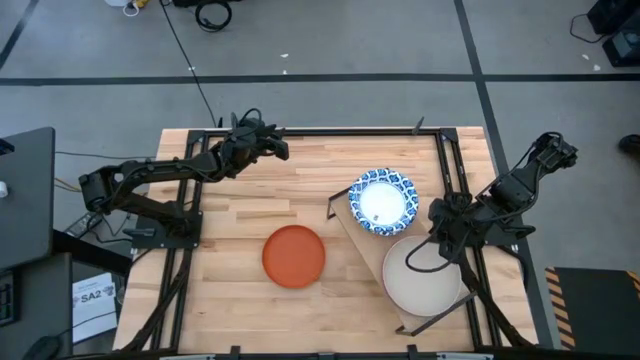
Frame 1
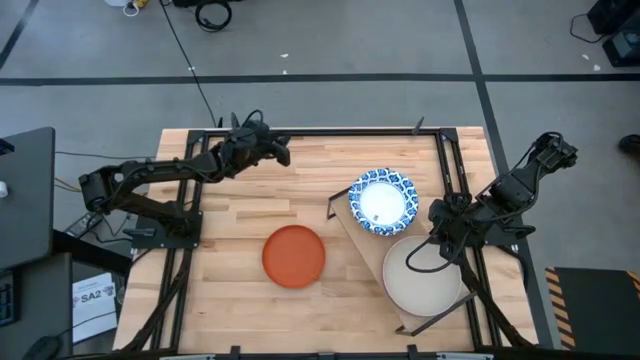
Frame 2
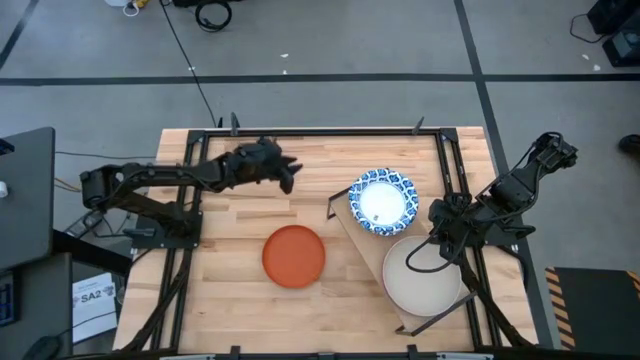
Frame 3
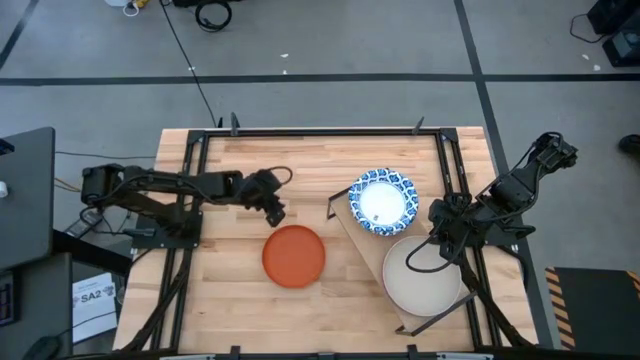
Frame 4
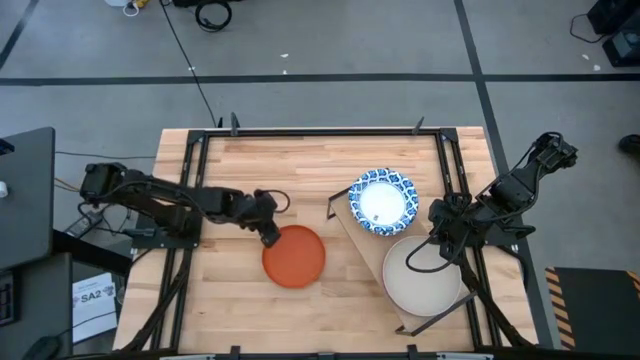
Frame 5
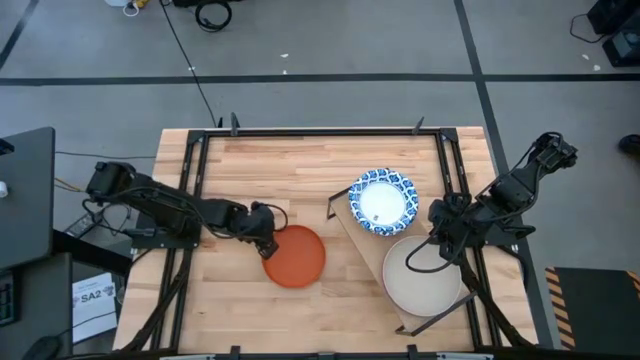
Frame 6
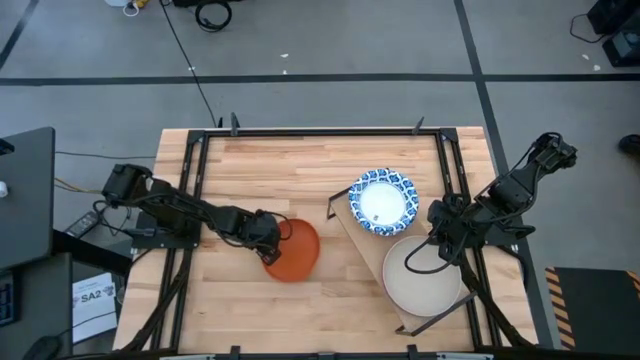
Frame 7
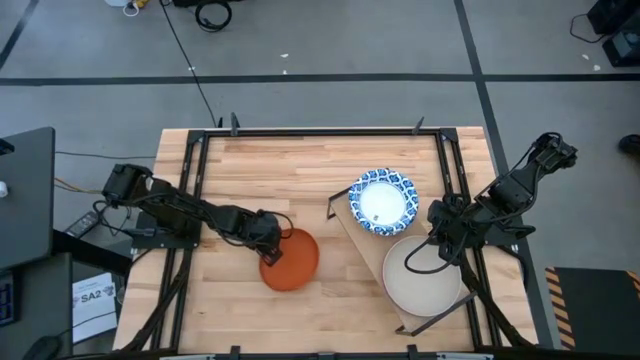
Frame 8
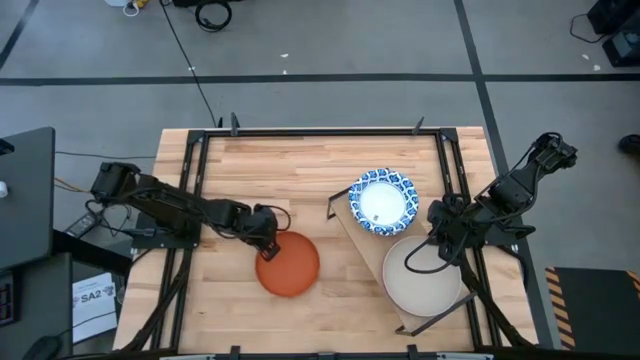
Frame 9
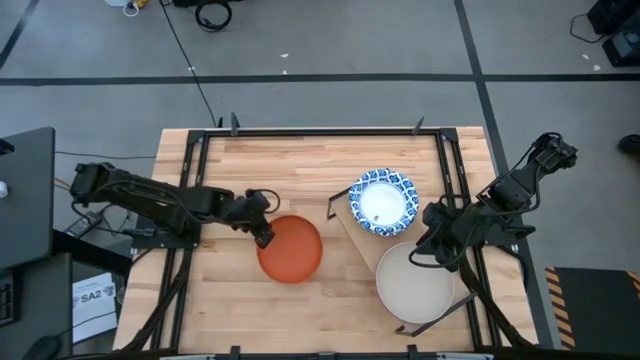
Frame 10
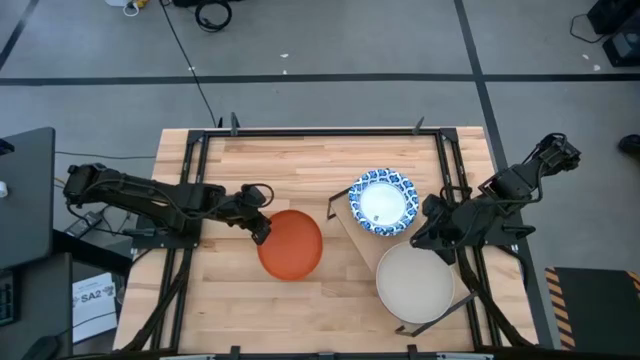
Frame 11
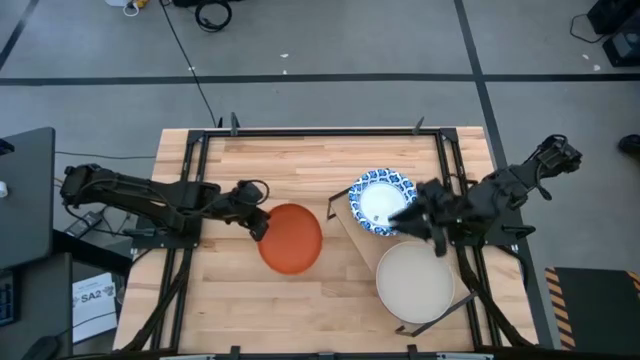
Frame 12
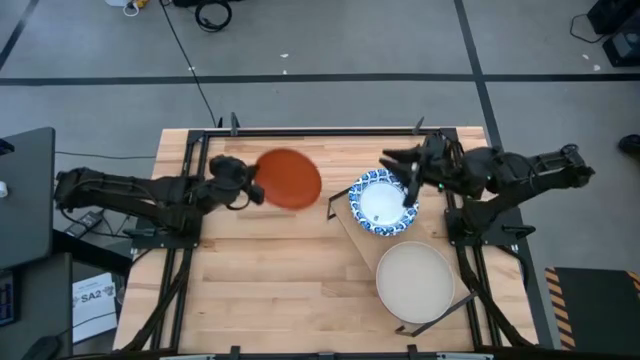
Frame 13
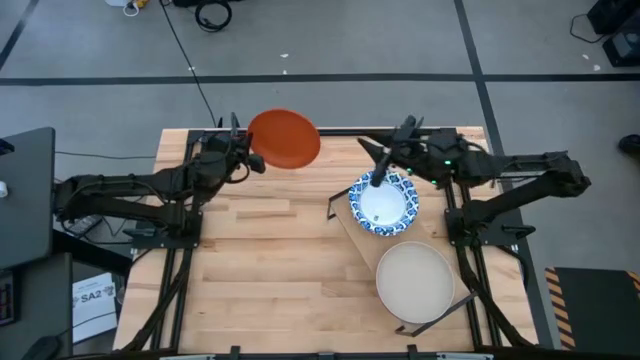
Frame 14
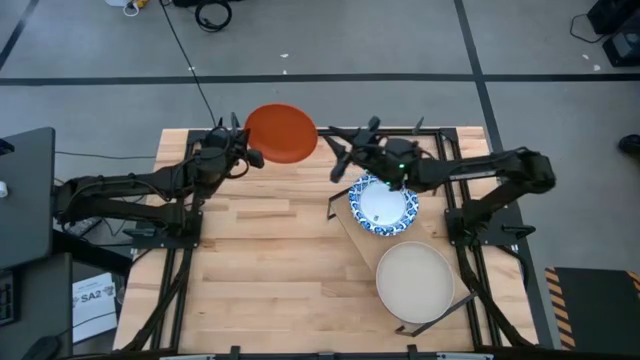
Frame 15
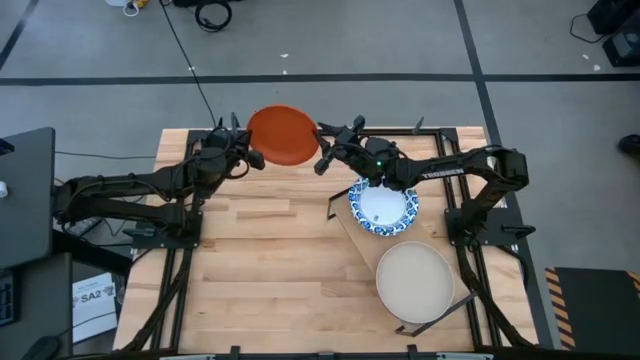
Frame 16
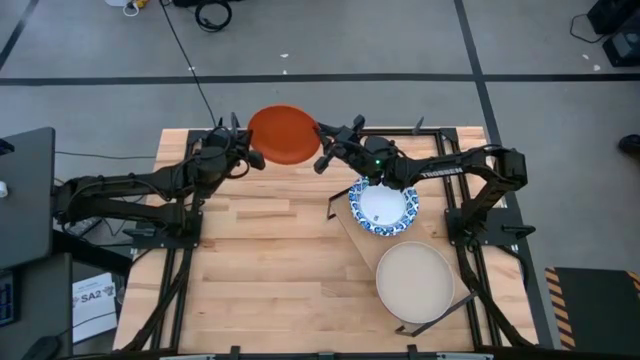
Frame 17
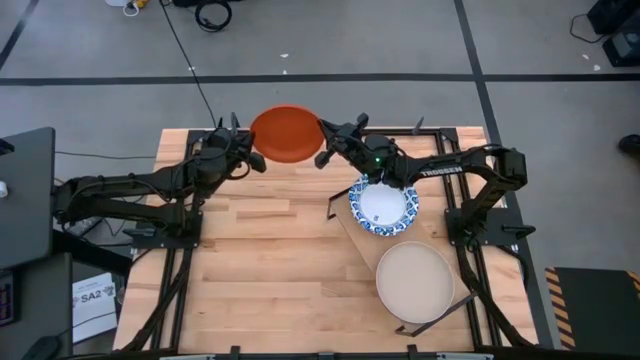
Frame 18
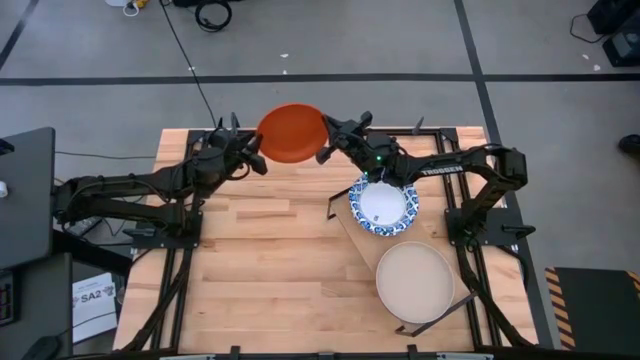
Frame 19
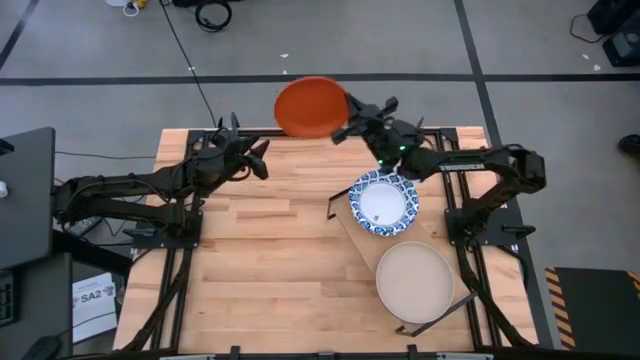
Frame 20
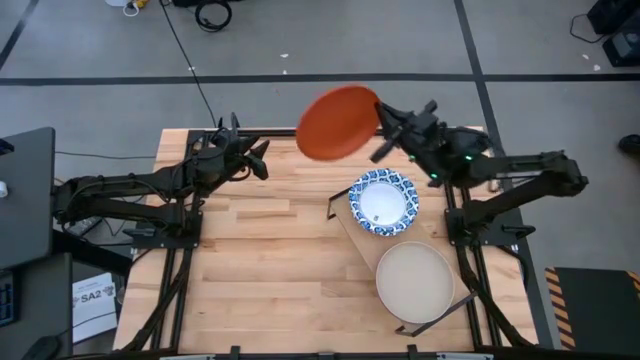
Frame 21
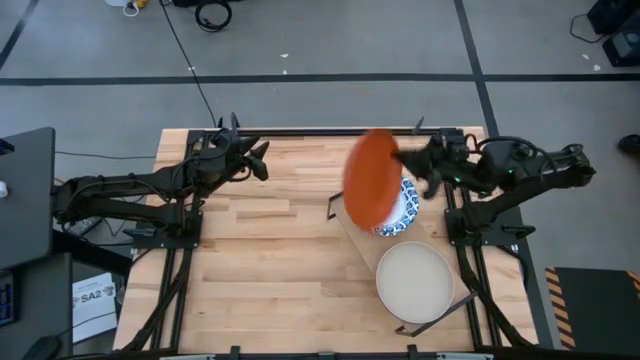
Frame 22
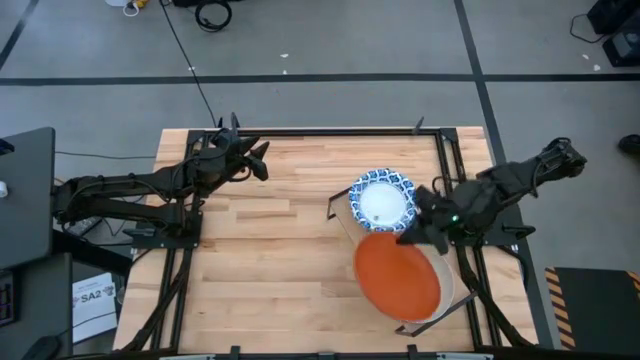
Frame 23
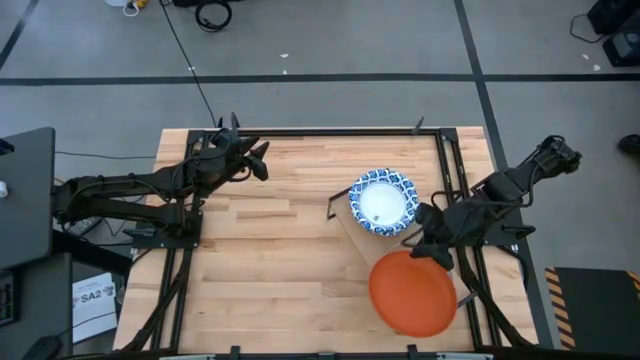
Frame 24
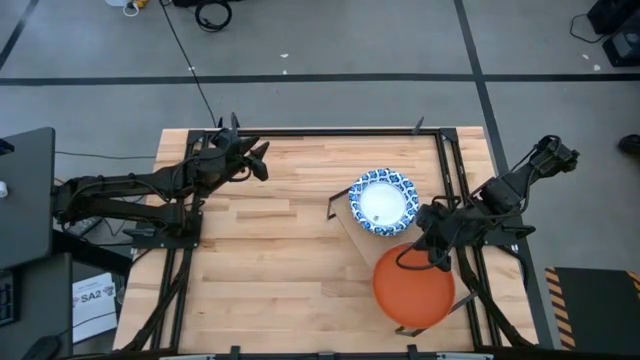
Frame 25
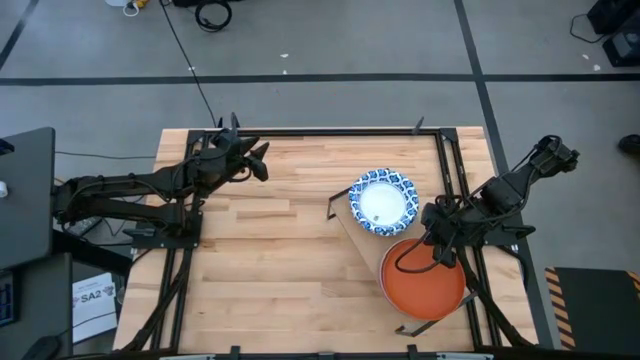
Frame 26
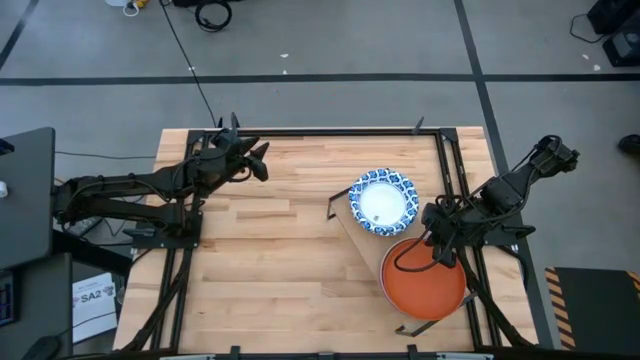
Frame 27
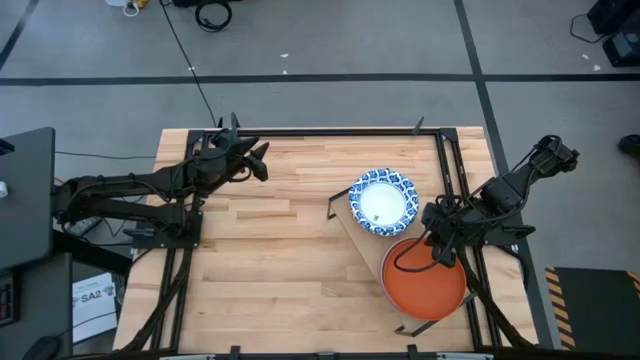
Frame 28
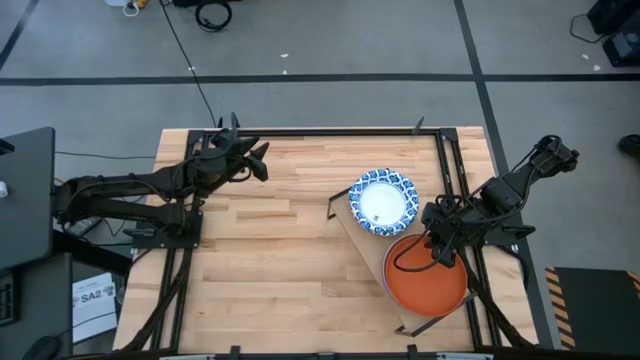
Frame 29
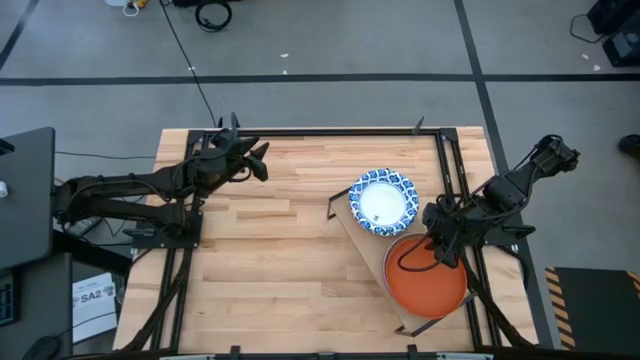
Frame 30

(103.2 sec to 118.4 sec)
Task: Place and stack plates onto a shelf
Stack the orange plate on top of the gray plate on the shelf

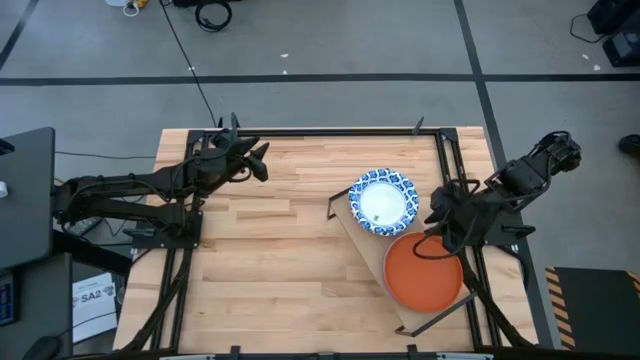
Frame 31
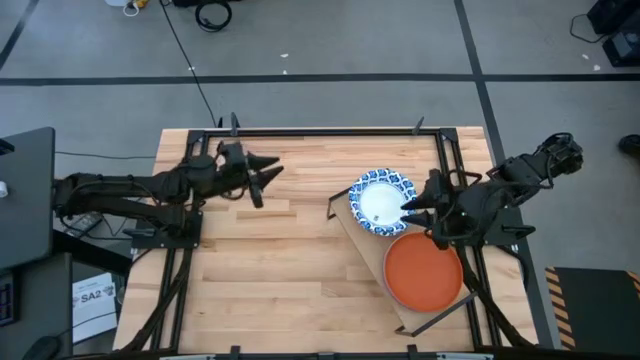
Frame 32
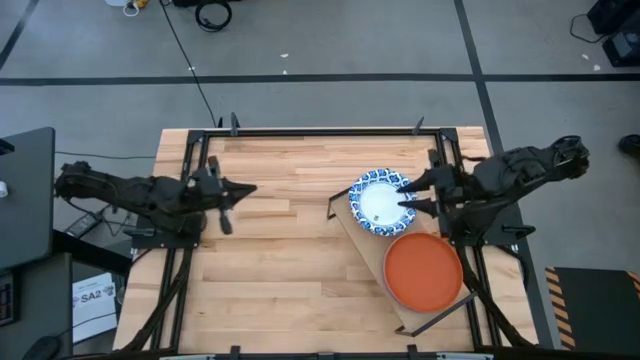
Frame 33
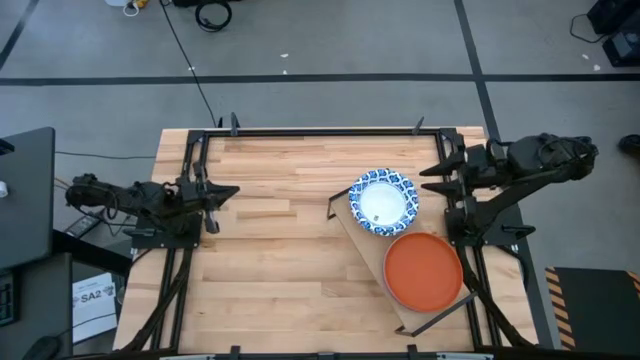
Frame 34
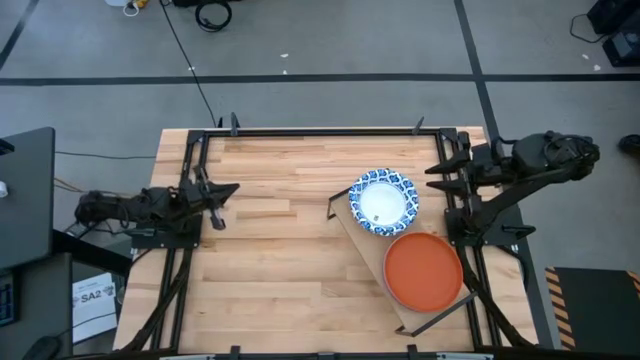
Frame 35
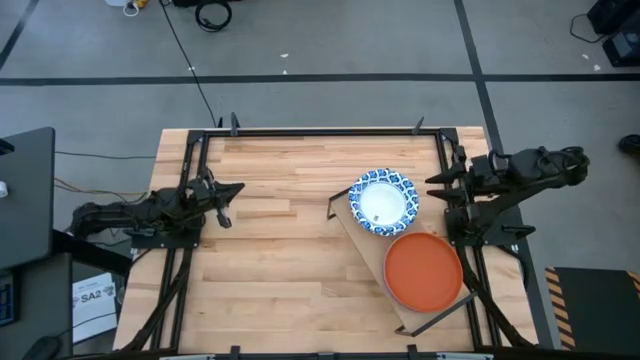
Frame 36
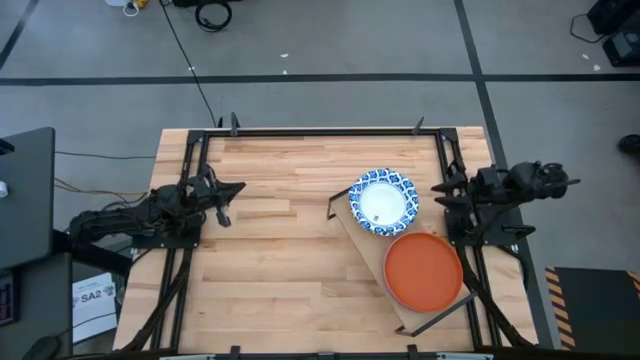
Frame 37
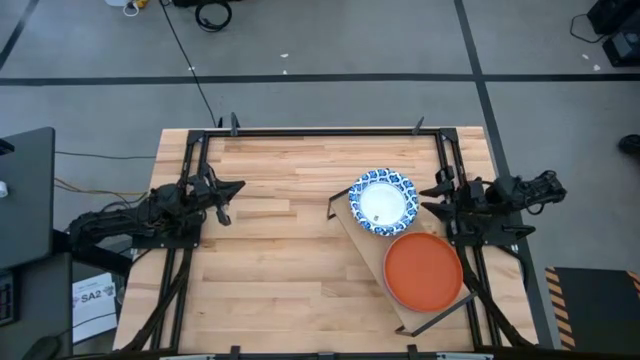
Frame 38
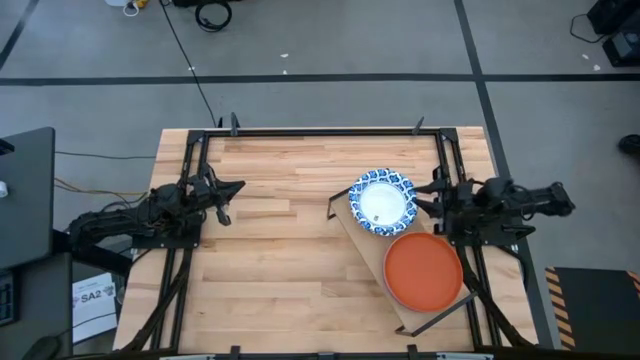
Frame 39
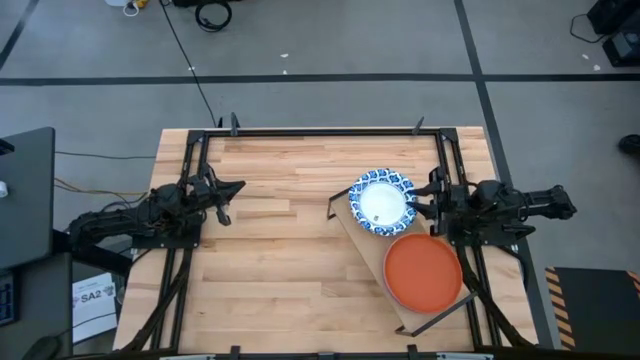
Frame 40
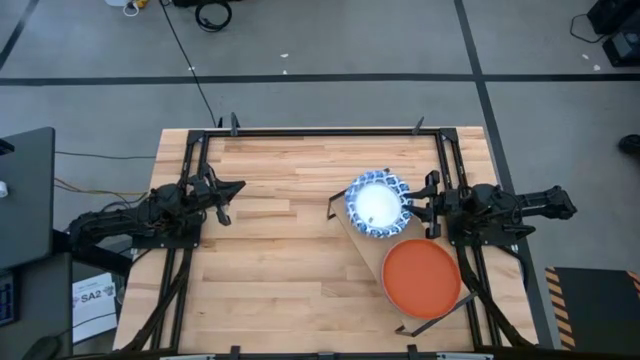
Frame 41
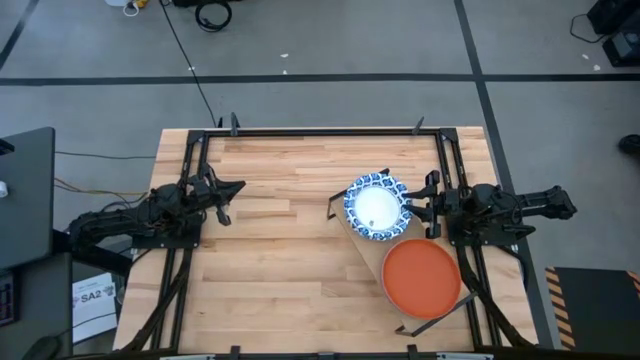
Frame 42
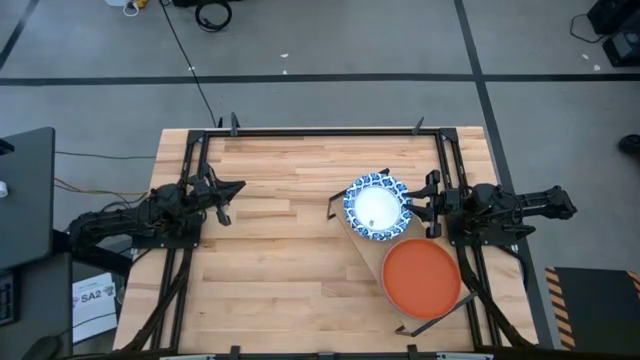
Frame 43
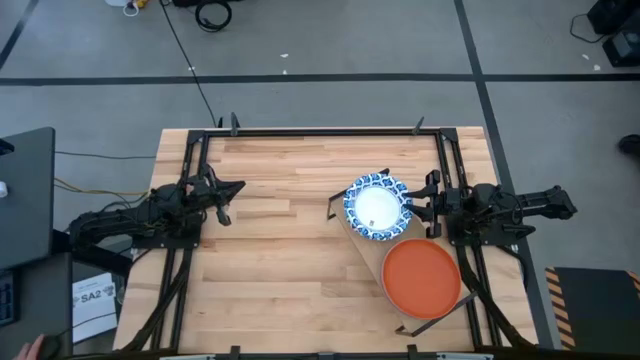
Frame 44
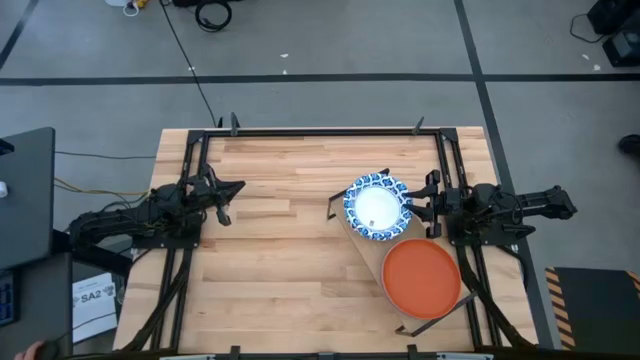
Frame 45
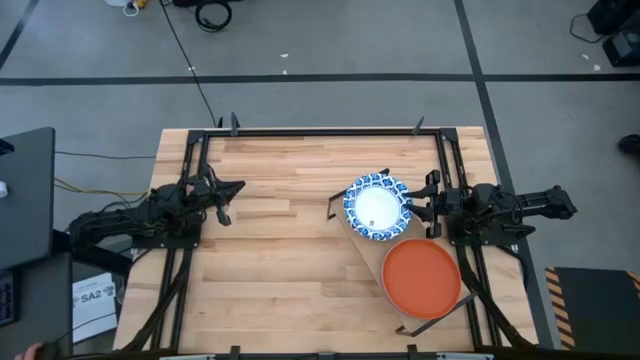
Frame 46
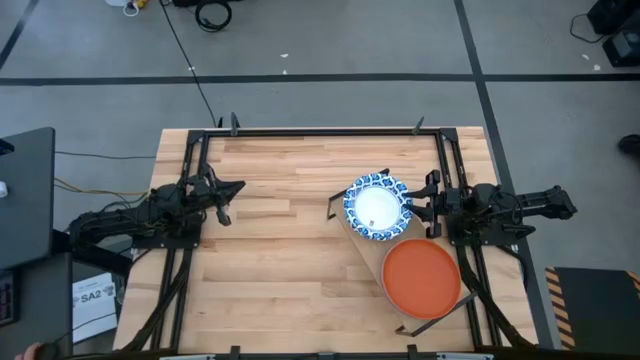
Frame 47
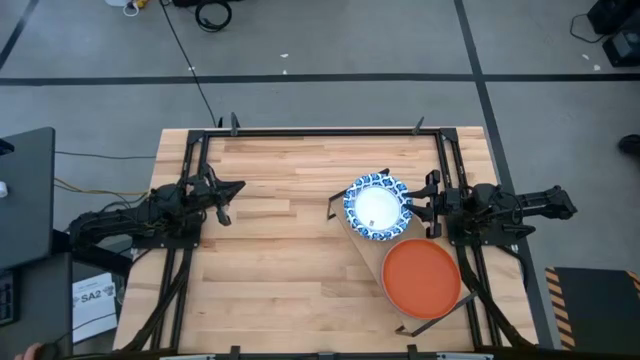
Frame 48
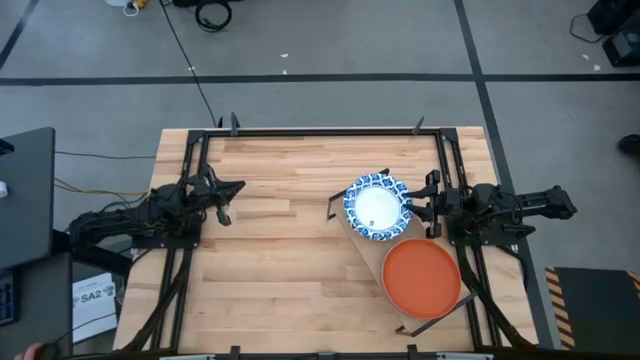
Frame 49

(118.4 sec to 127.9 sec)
Return to Home Position
